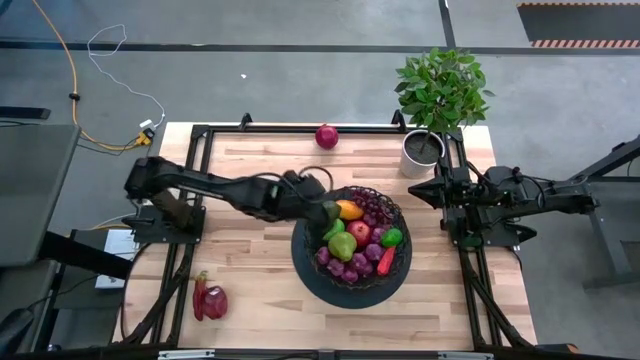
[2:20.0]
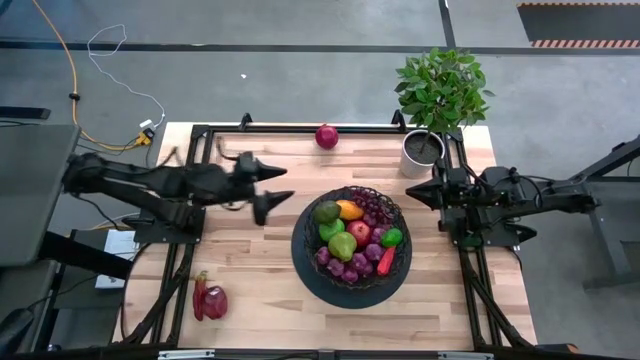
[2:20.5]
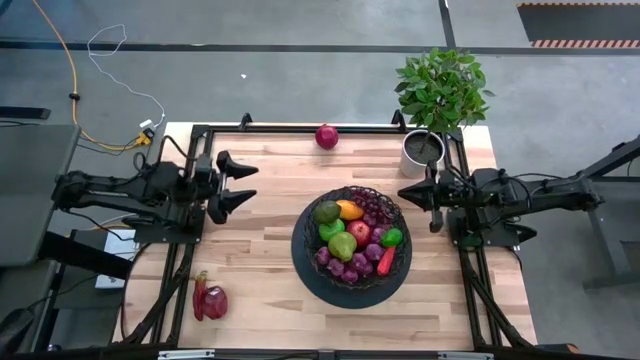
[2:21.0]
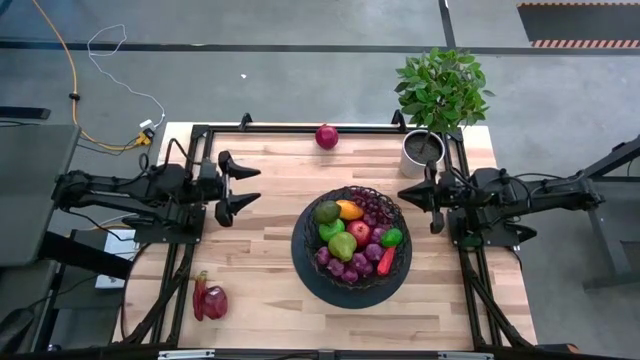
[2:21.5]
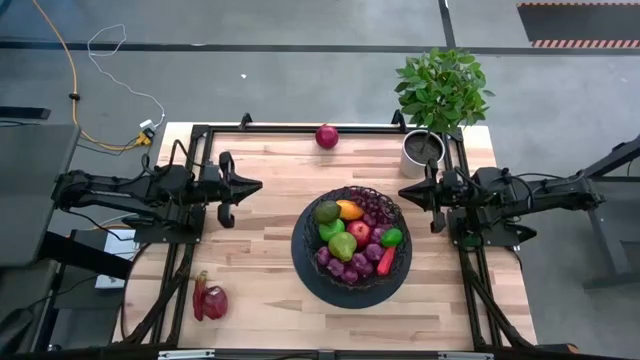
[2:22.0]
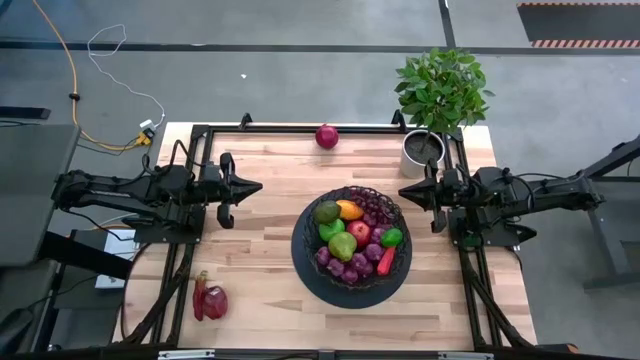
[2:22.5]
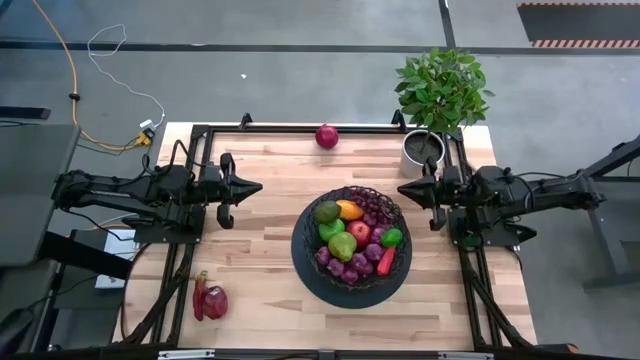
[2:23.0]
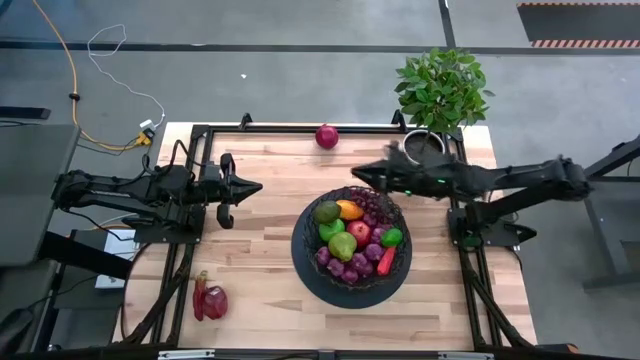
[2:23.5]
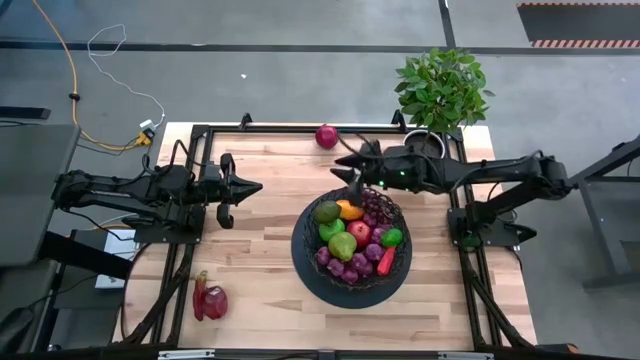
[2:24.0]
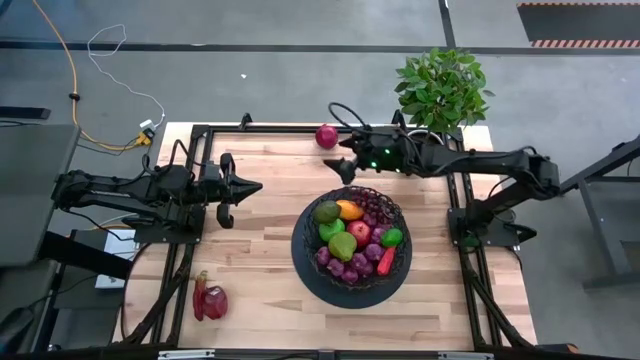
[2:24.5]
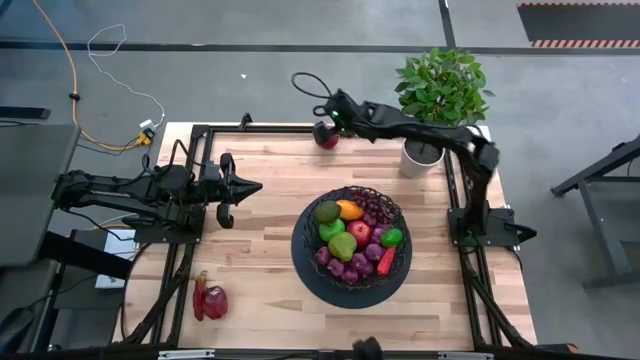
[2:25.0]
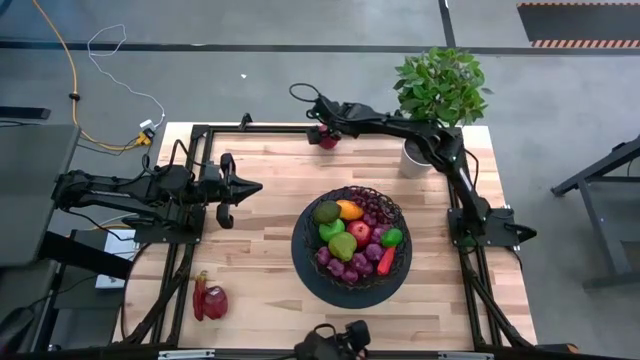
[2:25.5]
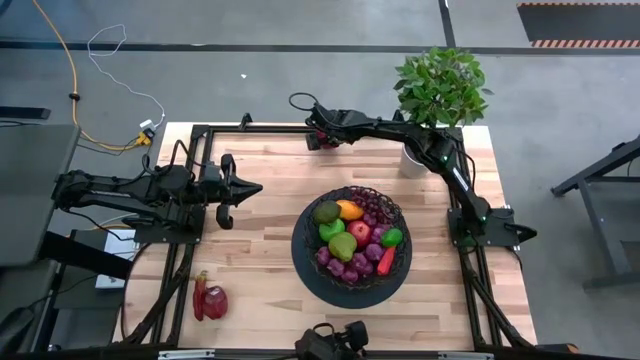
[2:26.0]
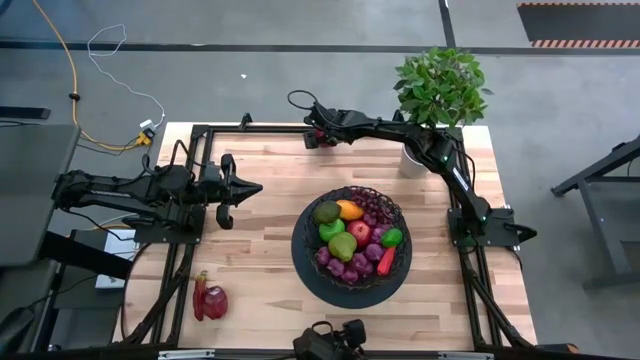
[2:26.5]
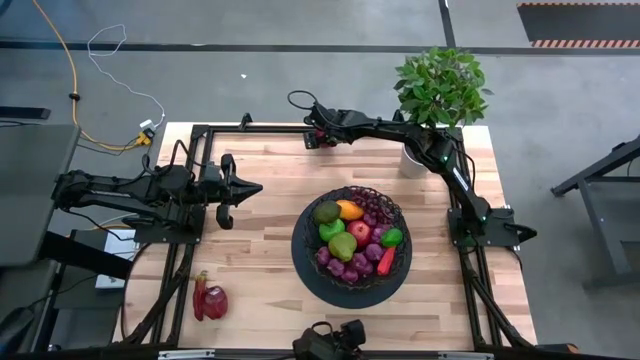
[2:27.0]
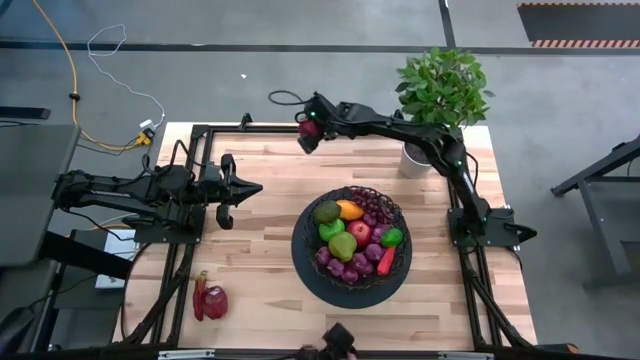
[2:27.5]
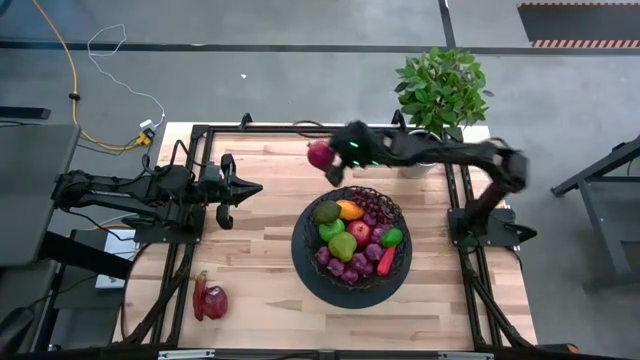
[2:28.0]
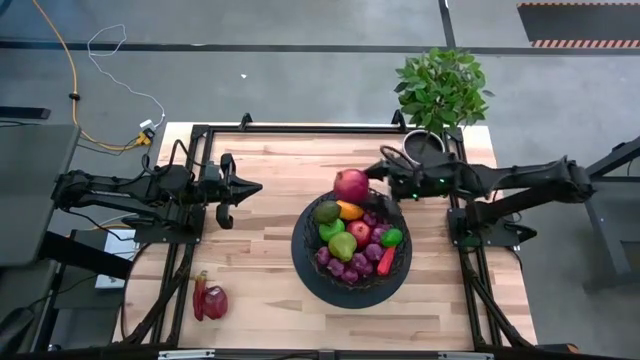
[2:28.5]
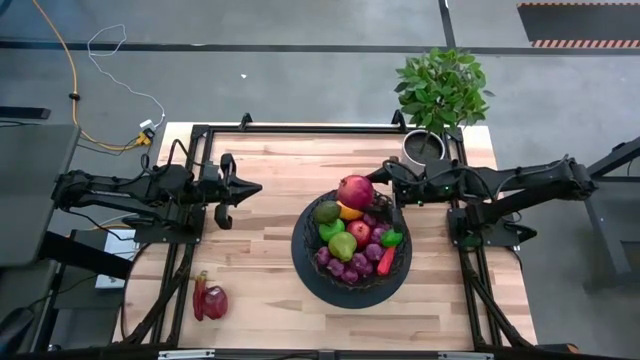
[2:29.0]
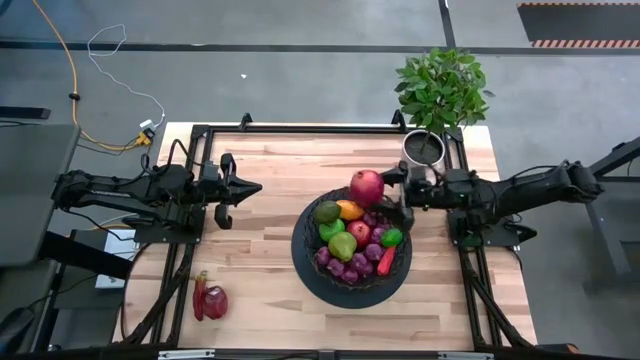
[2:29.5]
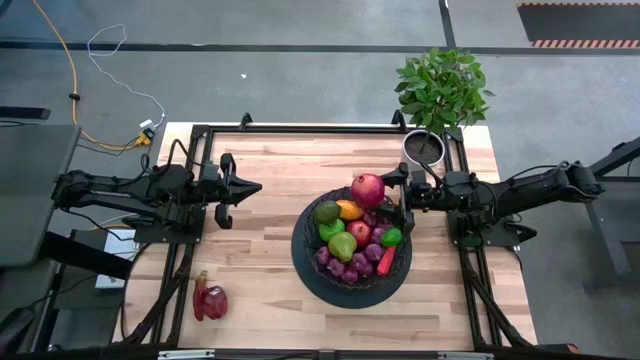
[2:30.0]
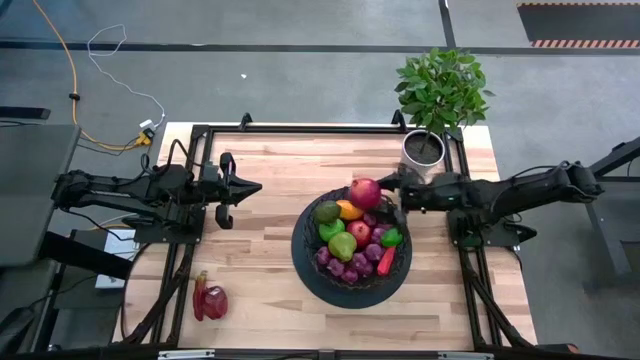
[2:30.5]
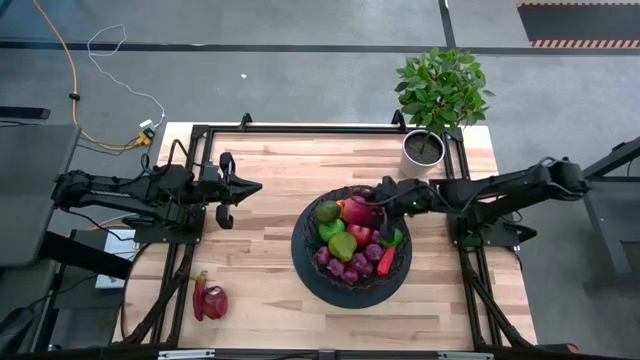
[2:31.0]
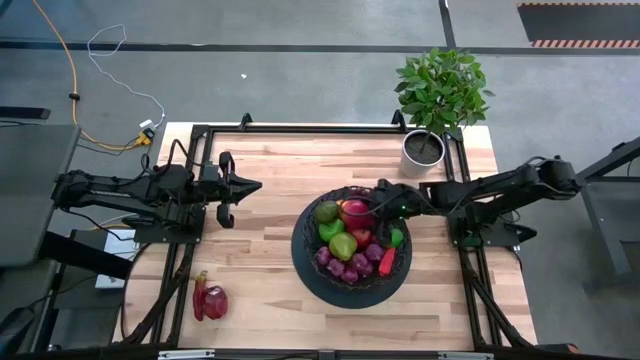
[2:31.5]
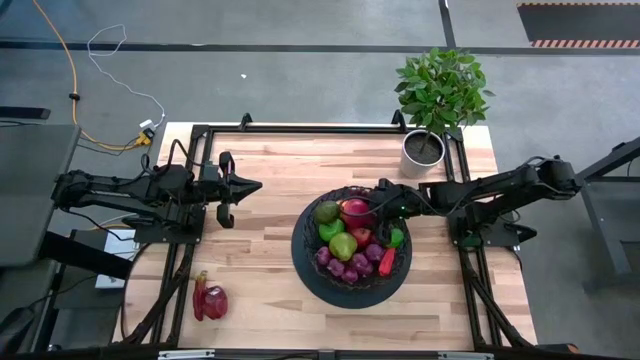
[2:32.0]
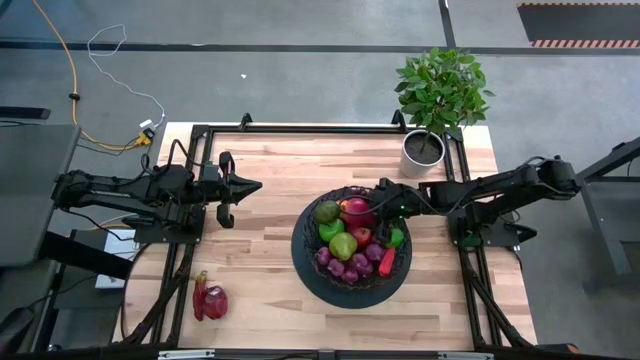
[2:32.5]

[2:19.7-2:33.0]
Task: Build produce basket
Put the red pomegranate into the basket

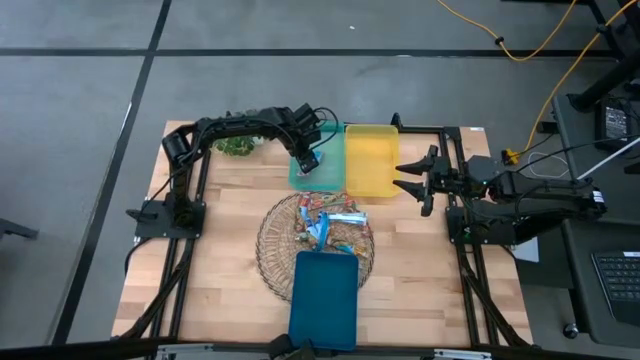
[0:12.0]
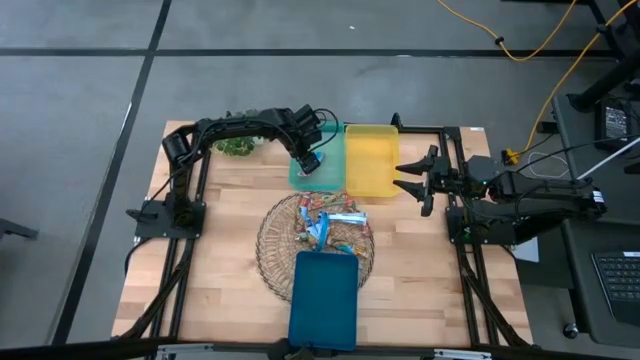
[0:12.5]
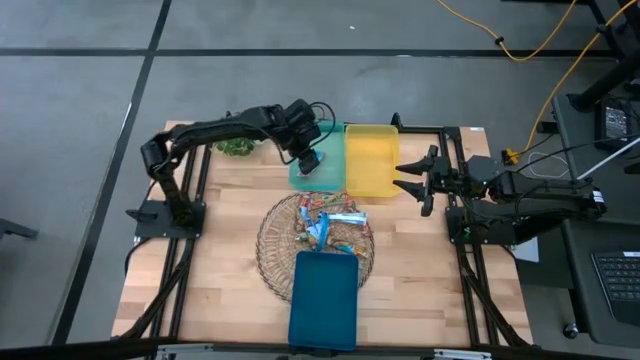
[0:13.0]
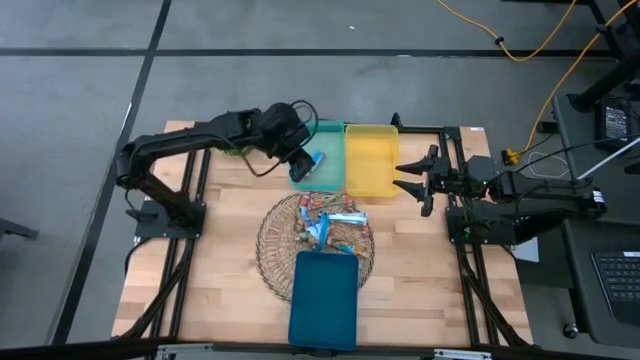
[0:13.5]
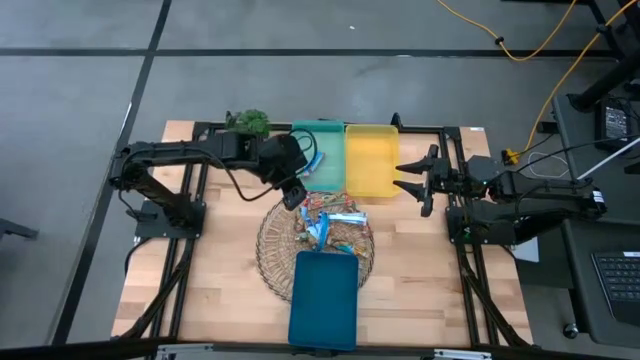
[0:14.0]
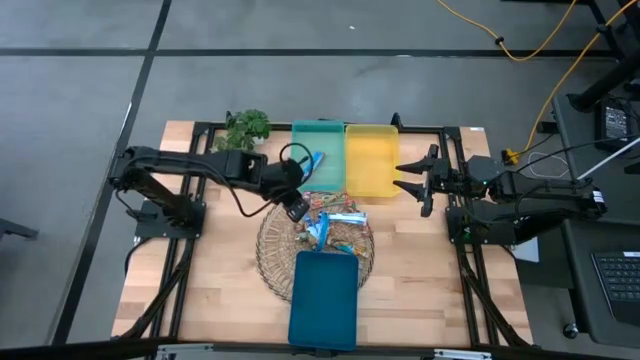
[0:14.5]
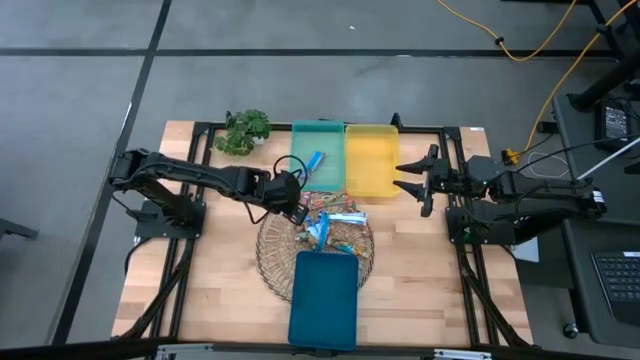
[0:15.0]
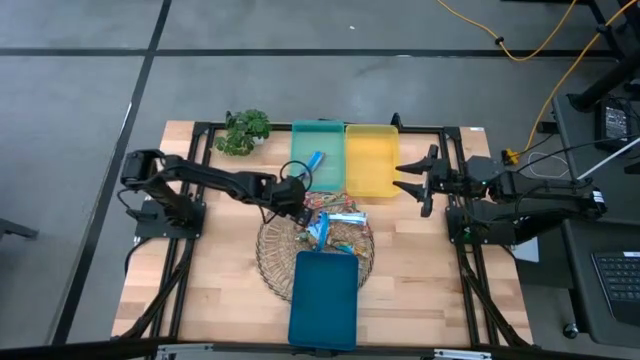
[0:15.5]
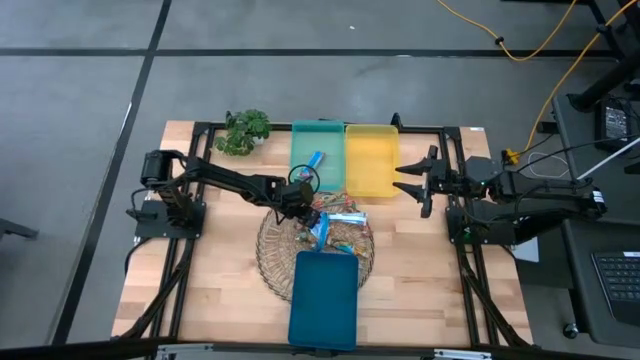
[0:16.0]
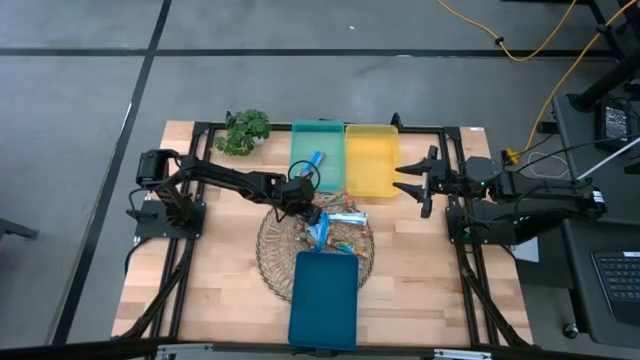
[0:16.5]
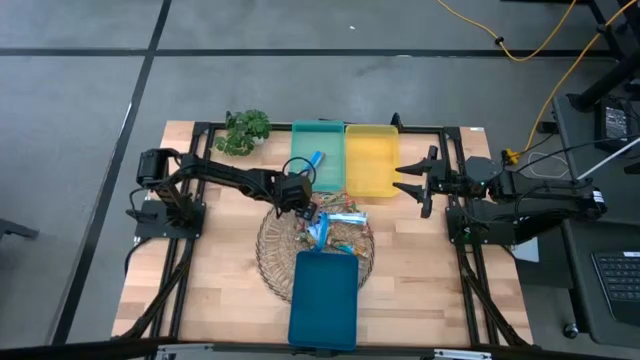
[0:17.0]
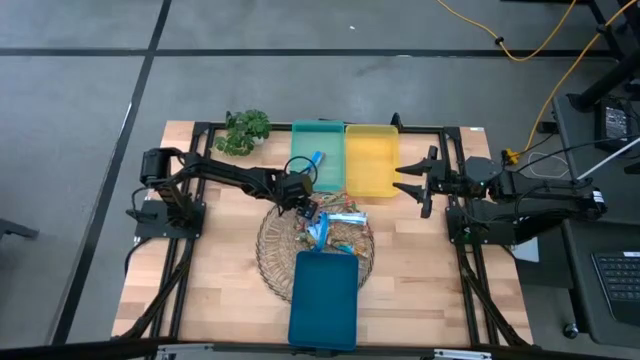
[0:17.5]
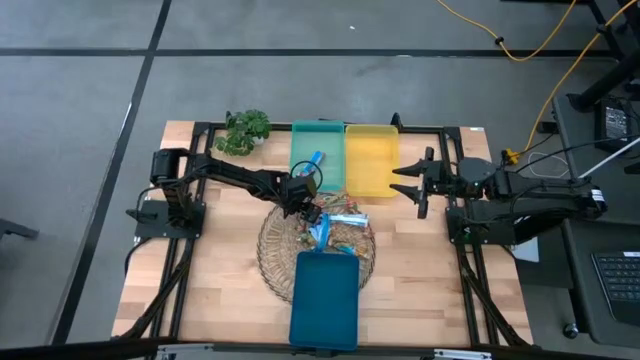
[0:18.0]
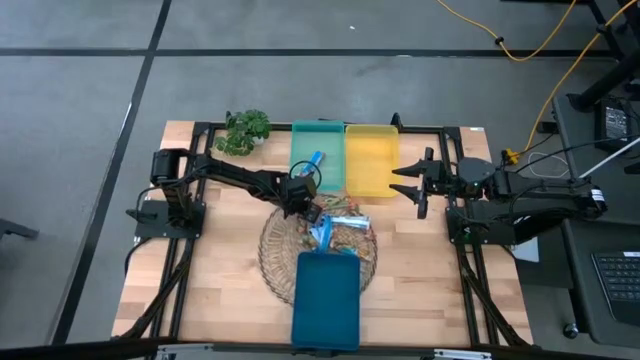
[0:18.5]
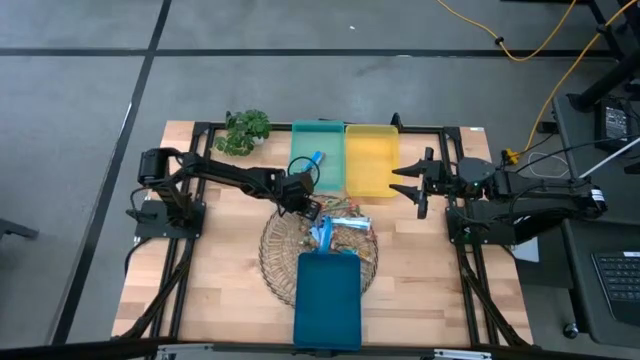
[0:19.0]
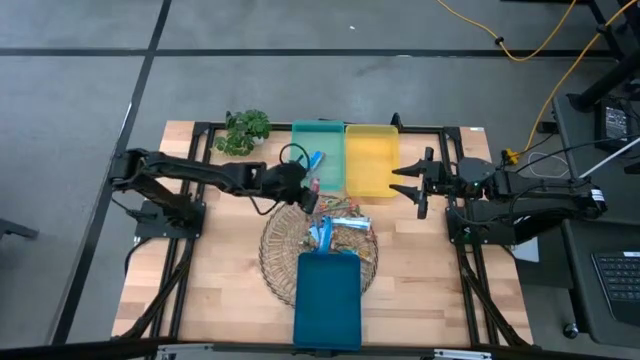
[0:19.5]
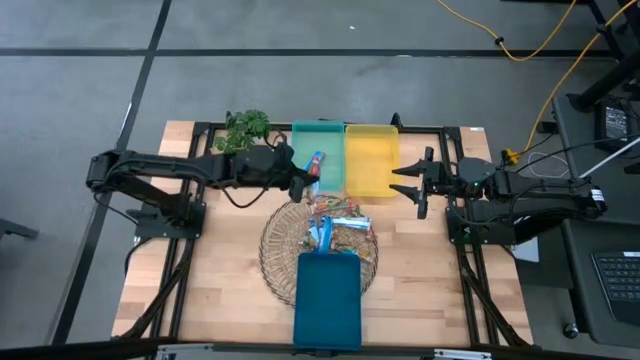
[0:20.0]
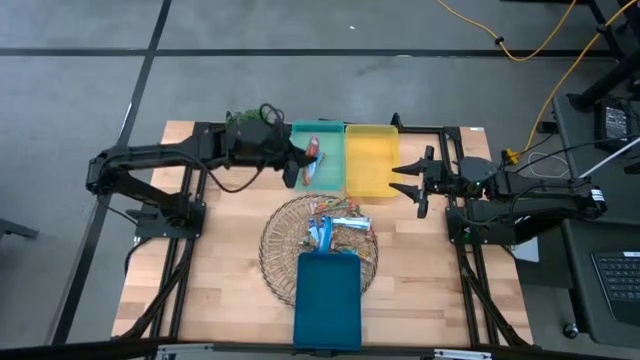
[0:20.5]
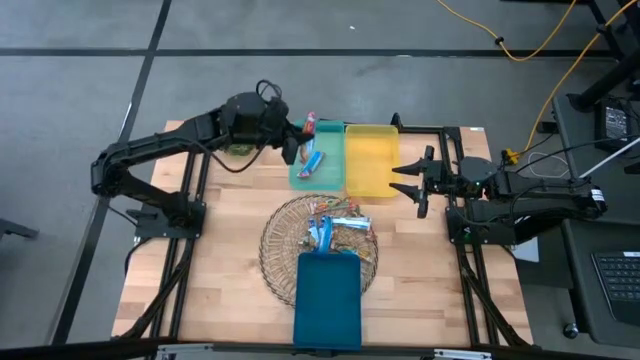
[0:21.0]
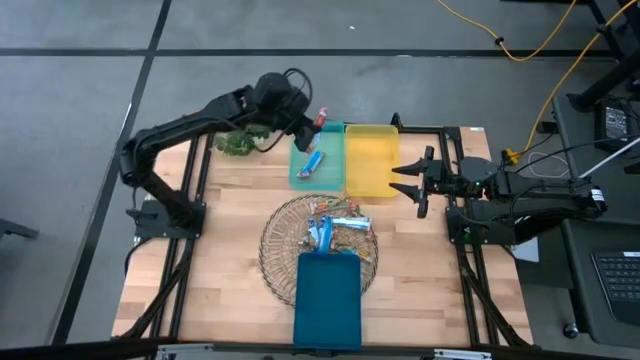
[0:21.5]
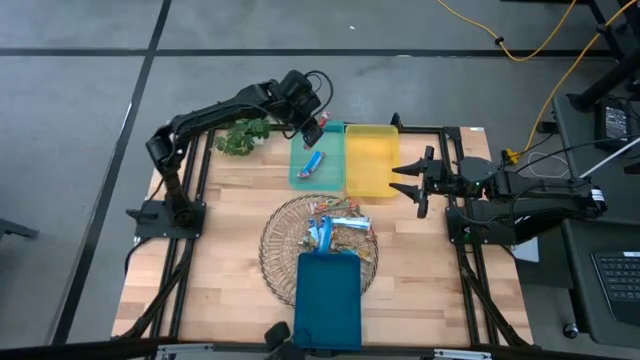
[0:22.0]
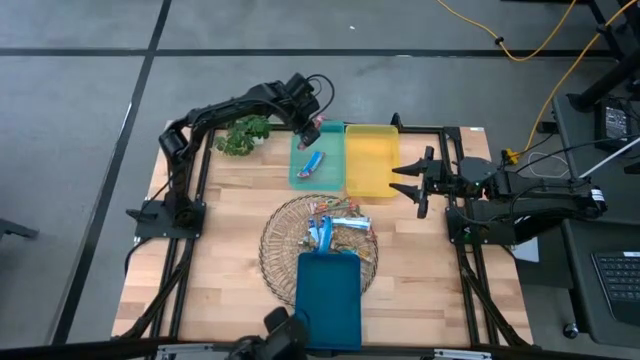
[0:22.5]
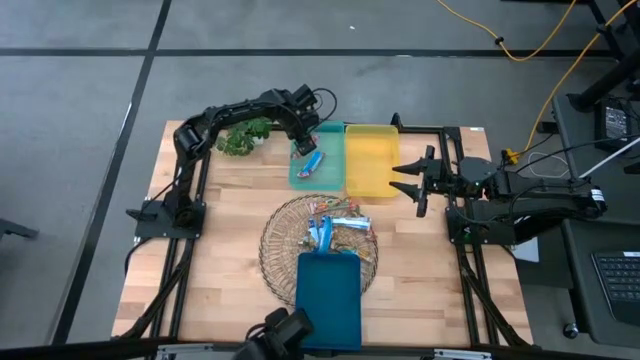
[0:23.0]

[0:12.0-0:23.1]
Task: Pick and place Granola Bars by type
Put the red granola bar into the green container
